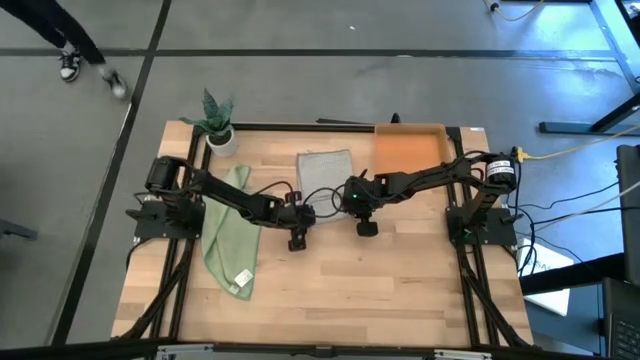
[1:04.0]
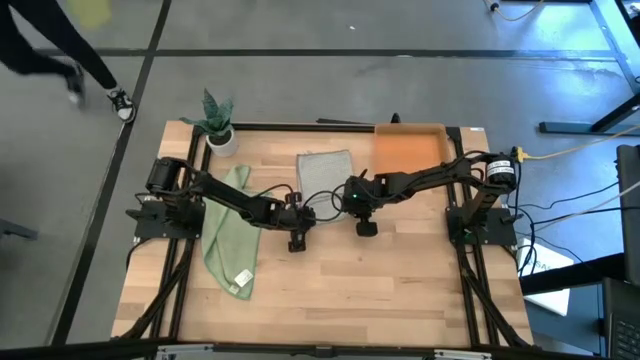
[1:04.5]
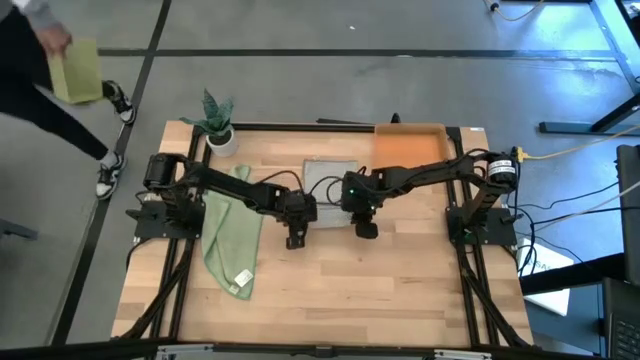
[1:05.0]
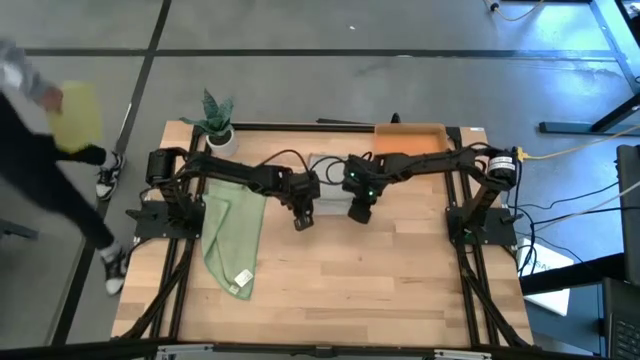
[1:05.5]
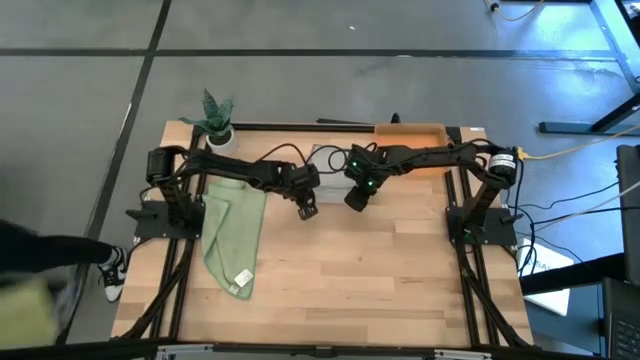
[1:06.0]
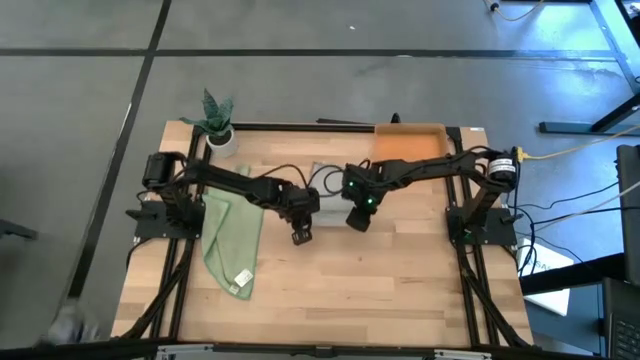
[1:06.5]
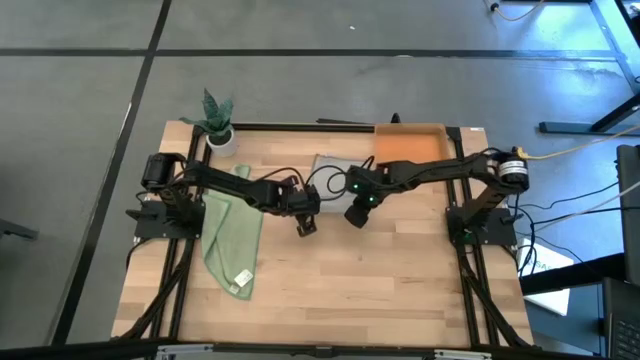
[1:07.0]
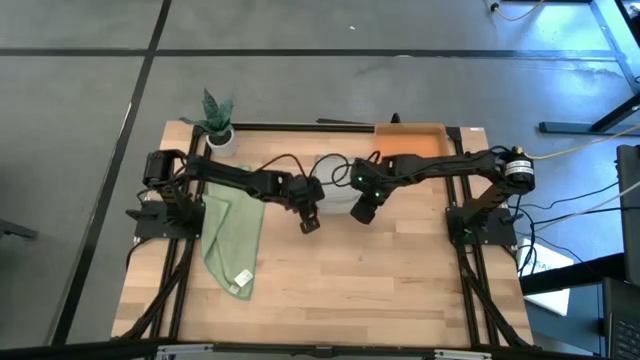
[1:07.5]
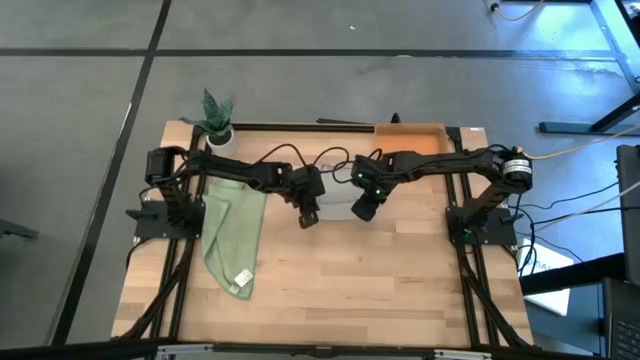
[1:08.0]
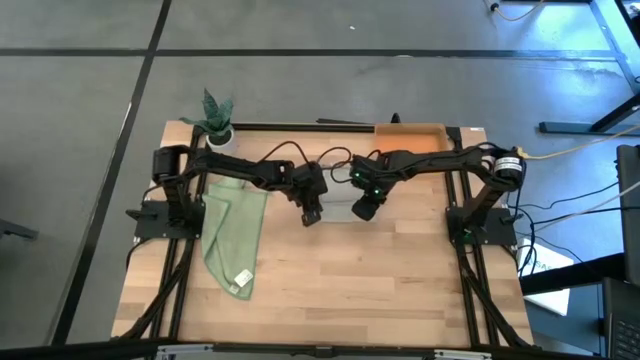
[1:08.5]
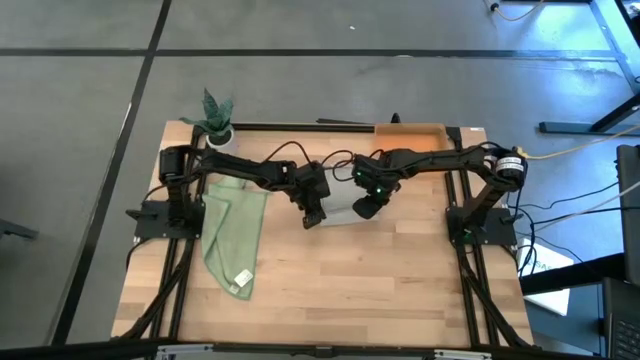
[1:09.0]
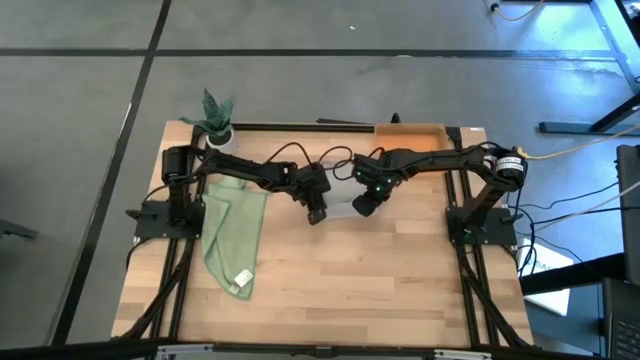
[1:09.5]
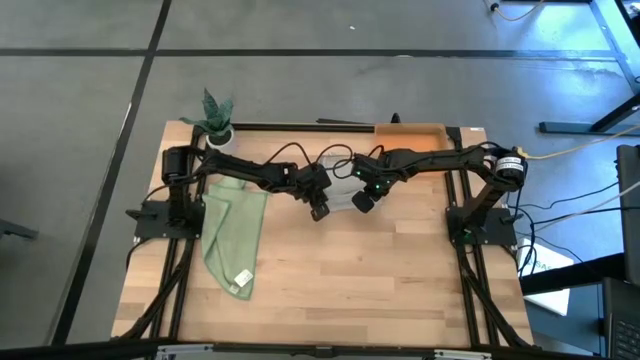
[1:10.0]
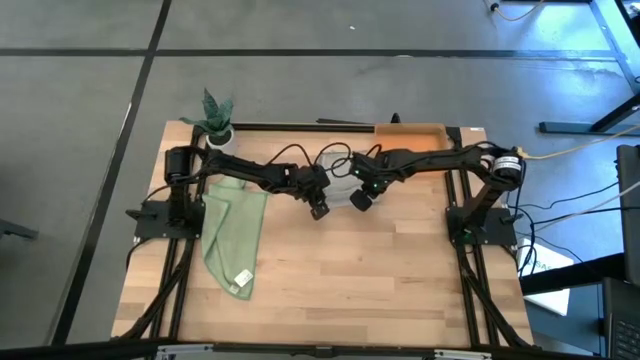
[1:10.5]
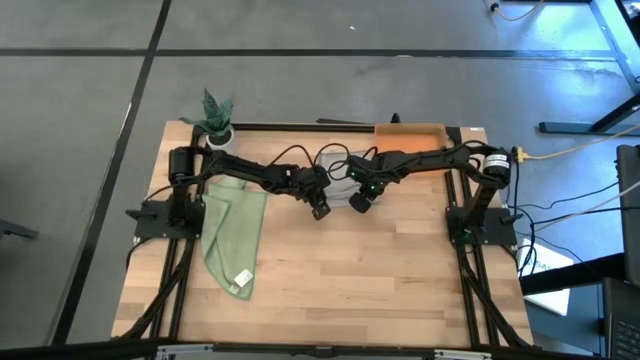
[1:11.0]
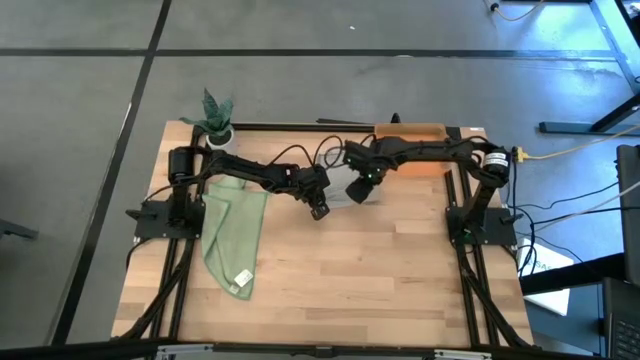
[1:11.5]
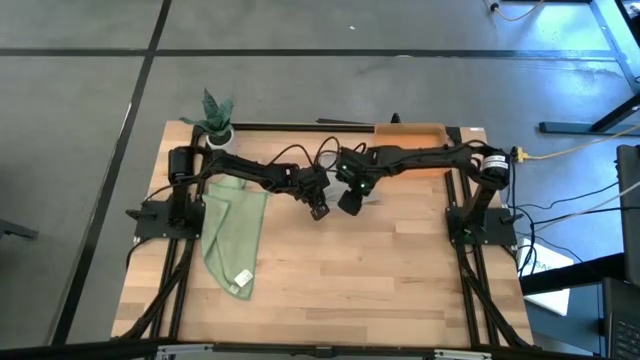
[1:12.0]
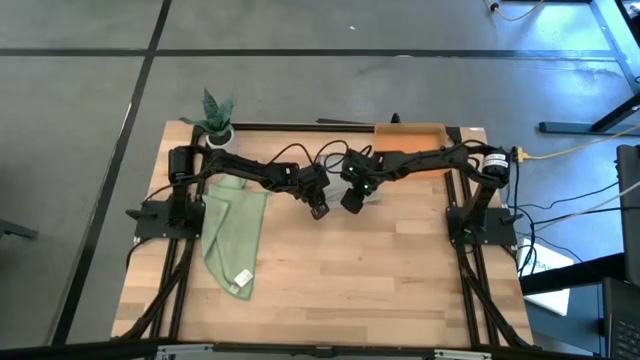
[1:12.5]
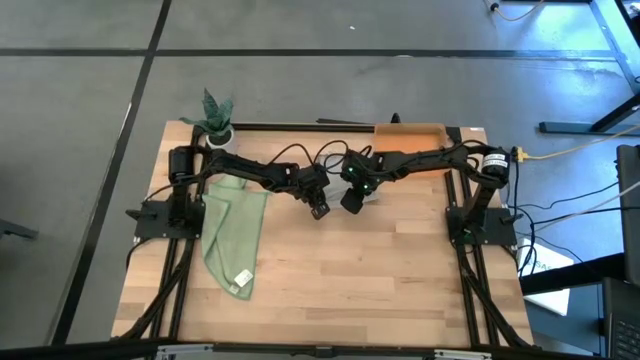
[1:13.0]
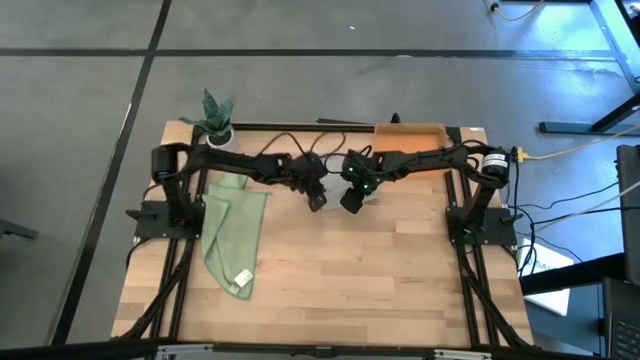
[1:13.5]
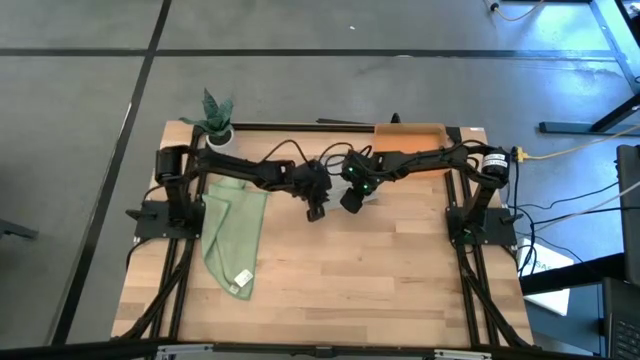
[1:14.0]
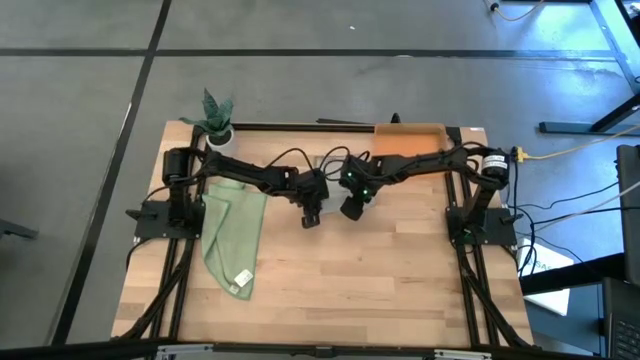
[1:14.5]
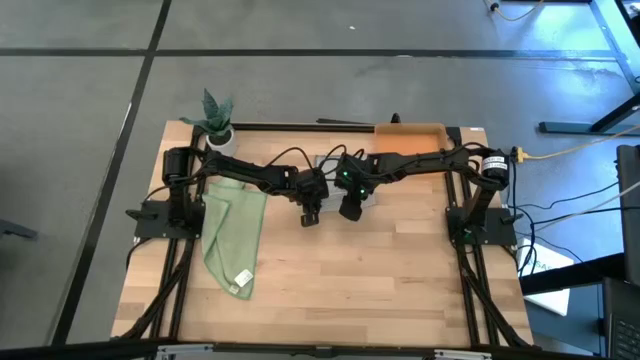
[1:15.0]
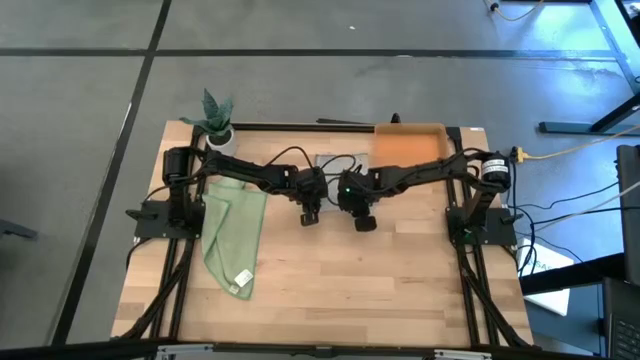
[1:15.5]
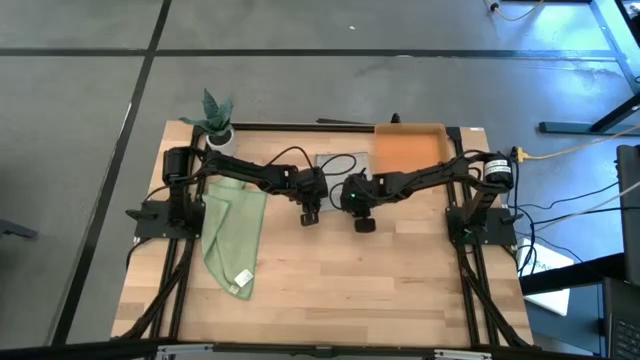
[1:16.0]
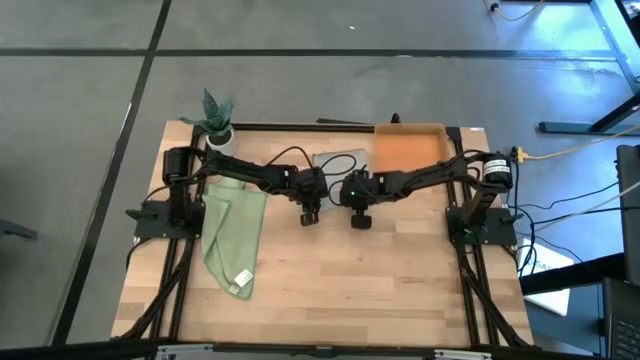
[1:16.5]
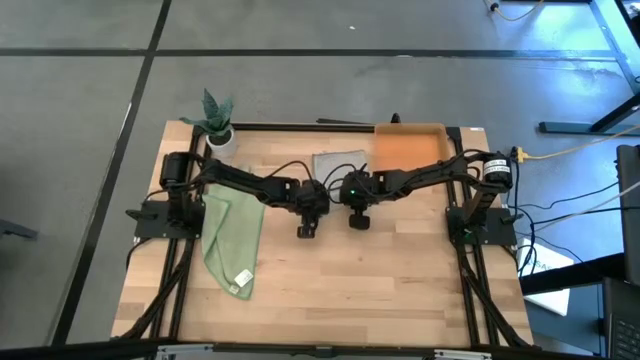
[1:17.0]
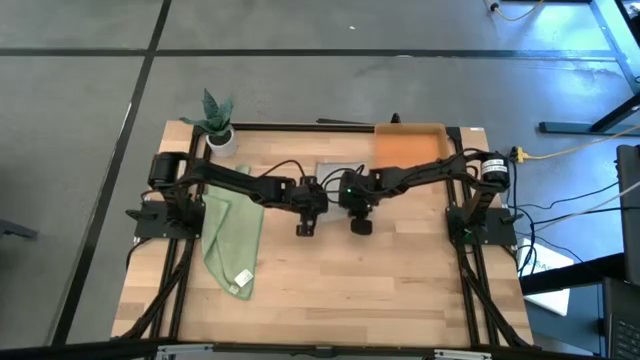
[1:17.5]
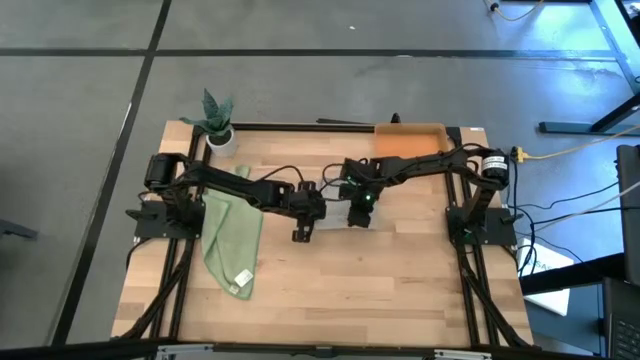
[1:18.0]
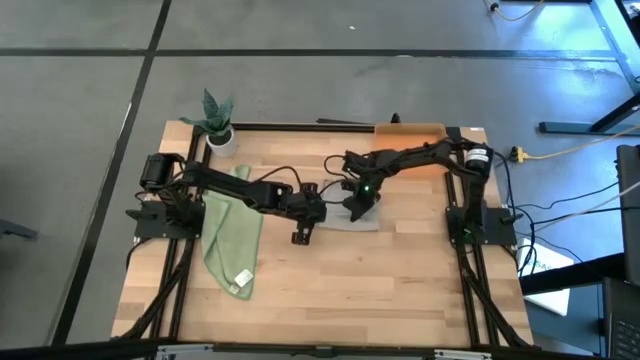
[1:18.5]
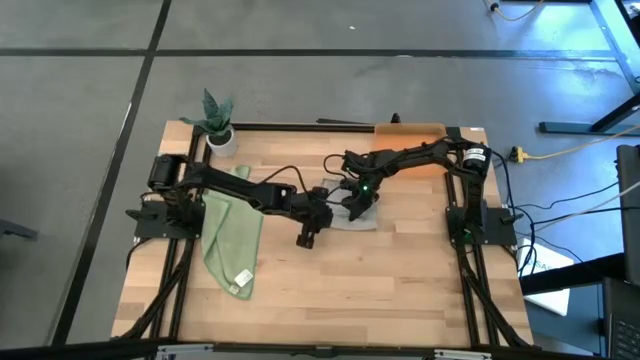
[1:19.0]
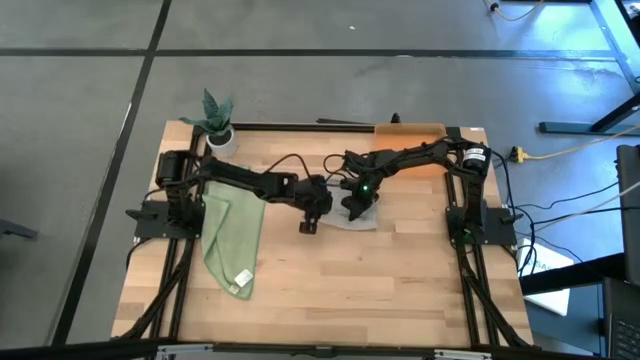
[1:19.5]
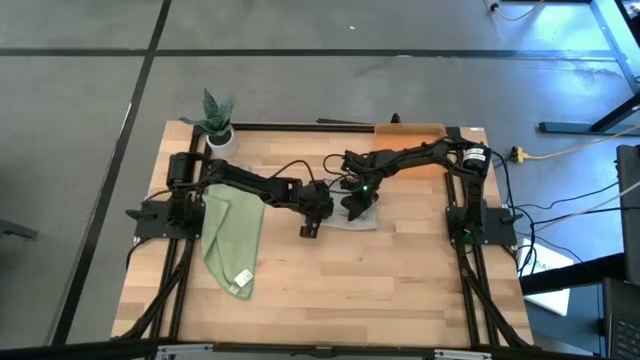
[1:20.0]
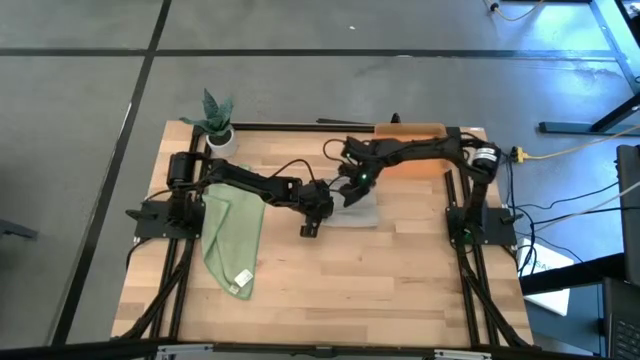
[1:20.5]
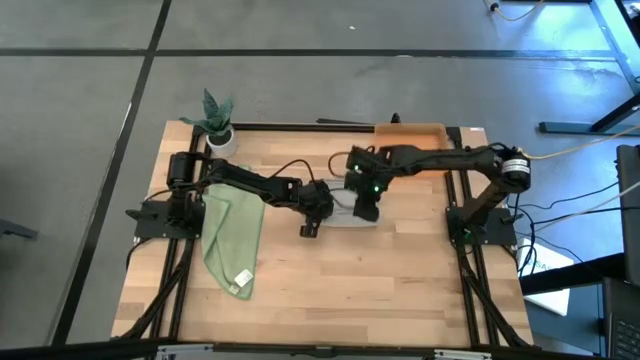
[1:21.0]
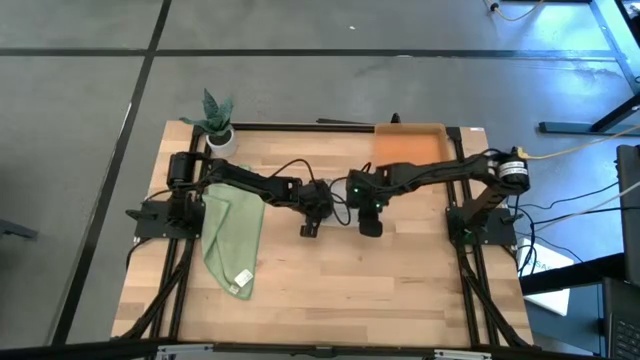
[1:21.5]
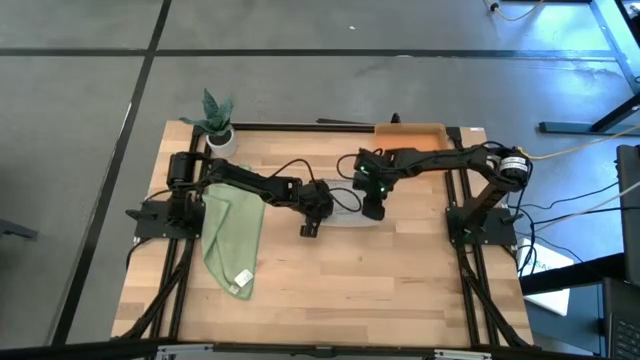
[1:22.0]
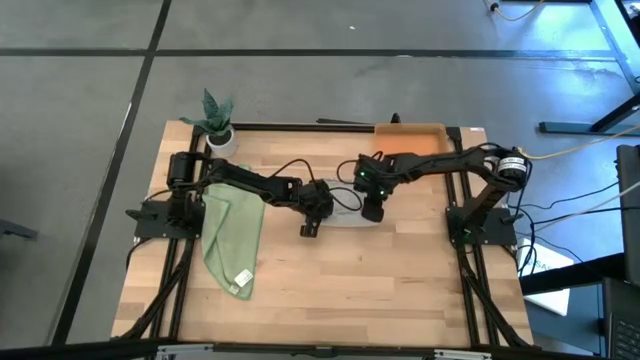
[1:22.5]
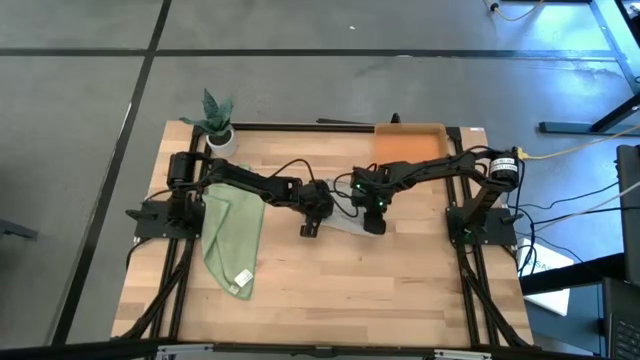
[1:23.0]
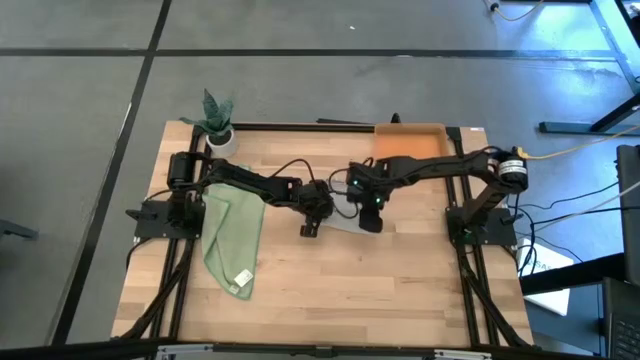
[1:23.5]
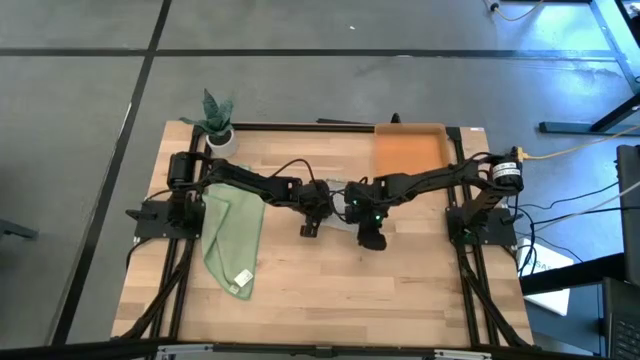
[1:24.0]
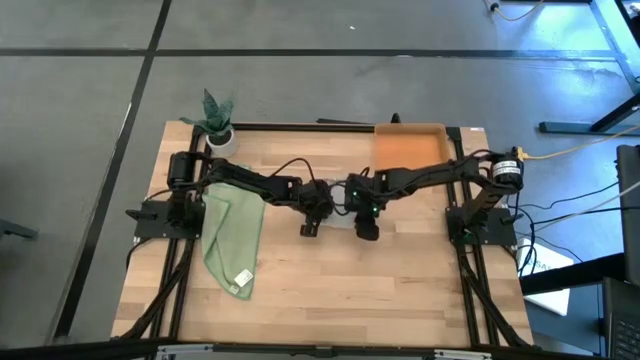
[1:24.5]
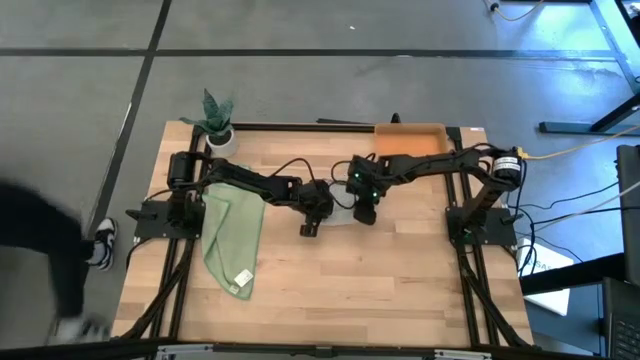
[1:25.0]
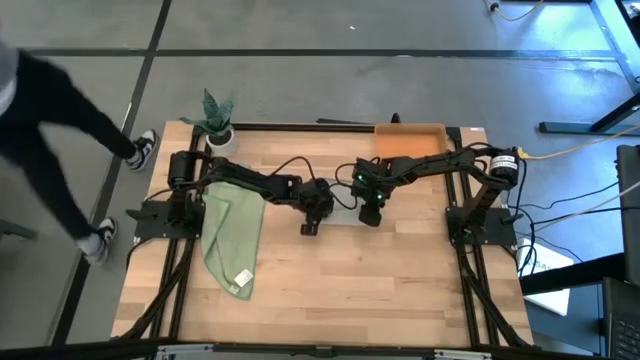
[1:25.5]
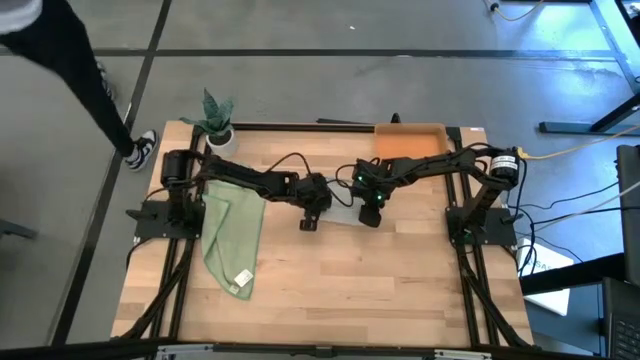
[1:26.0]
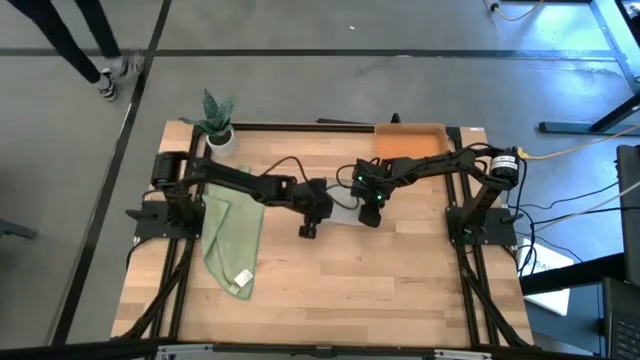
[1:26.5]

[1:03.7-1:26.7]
Task: Roll microfiber towels into tight, uniform cylinder then place into a basket
Roll the gray microfiber towel
